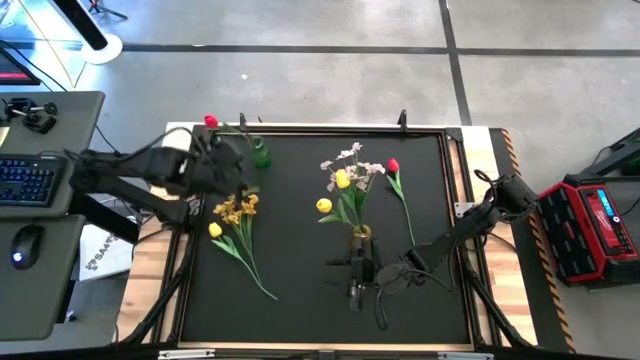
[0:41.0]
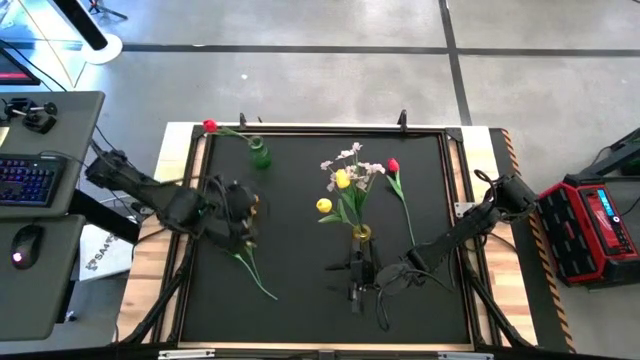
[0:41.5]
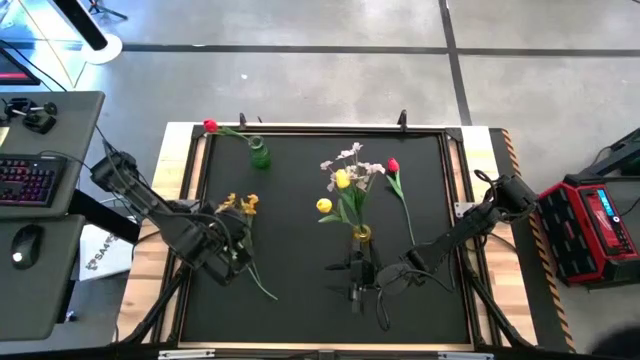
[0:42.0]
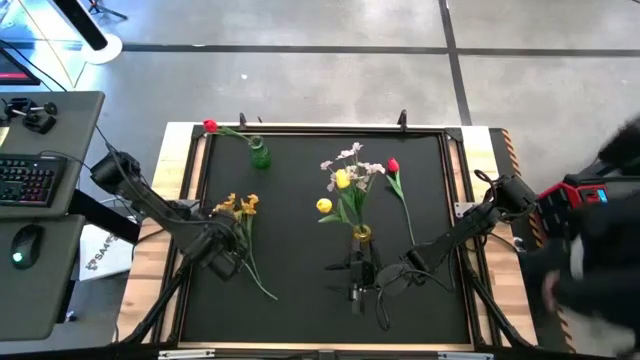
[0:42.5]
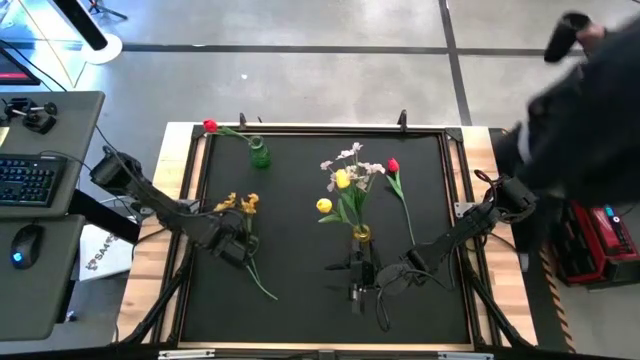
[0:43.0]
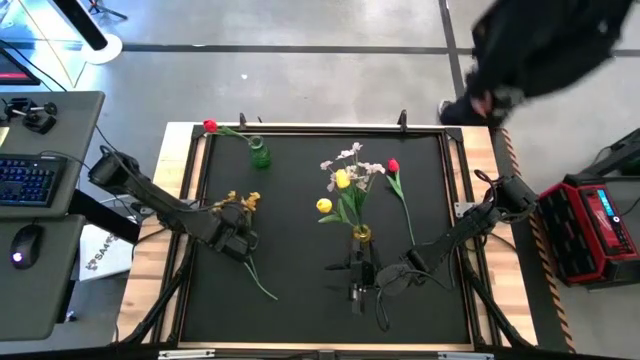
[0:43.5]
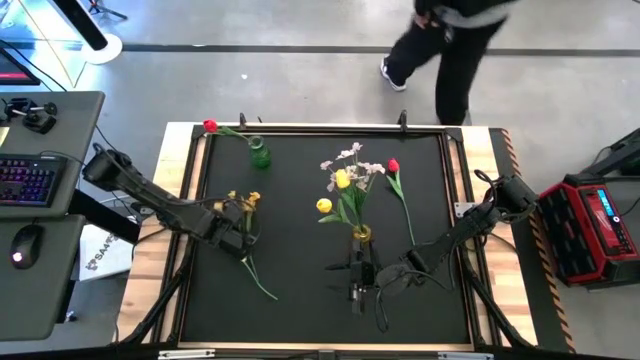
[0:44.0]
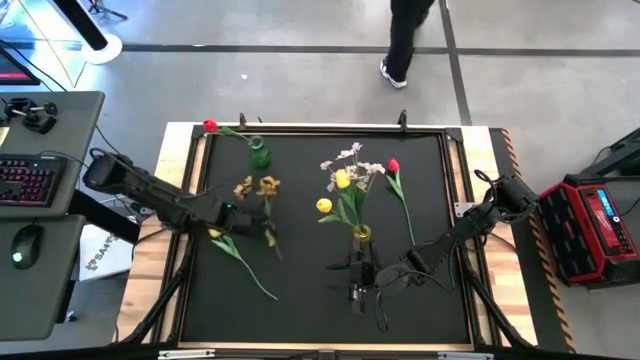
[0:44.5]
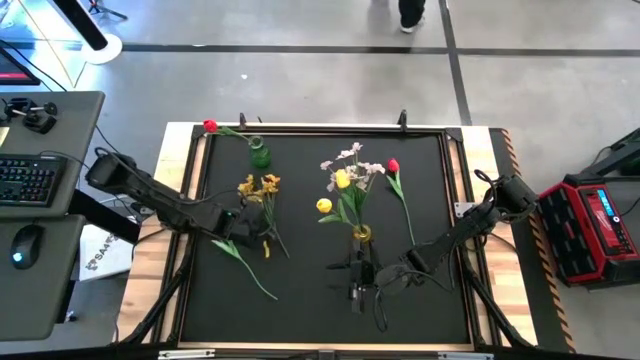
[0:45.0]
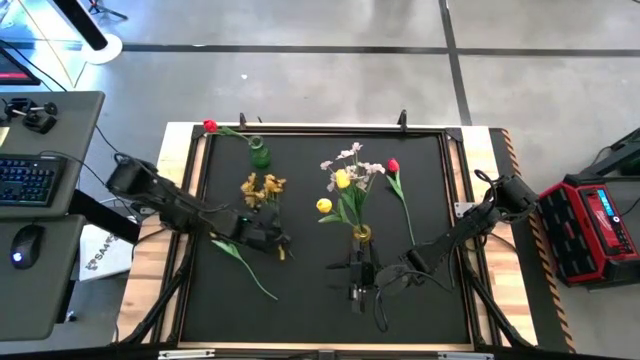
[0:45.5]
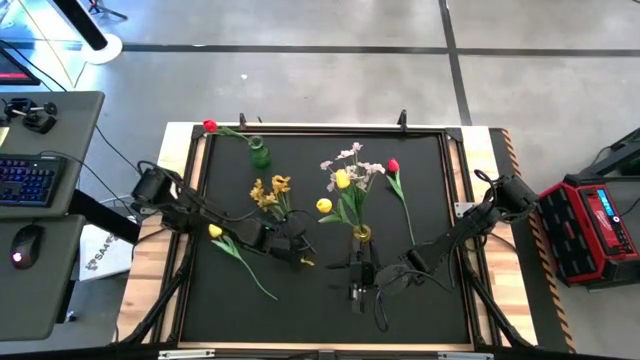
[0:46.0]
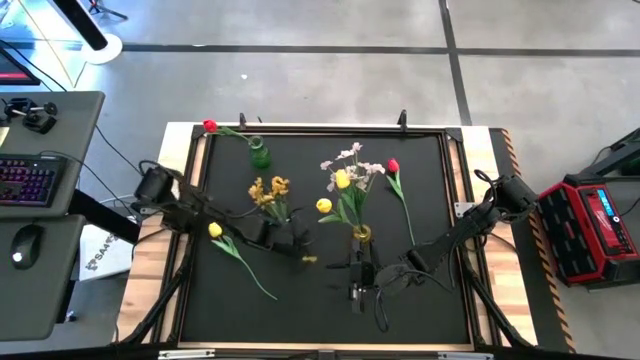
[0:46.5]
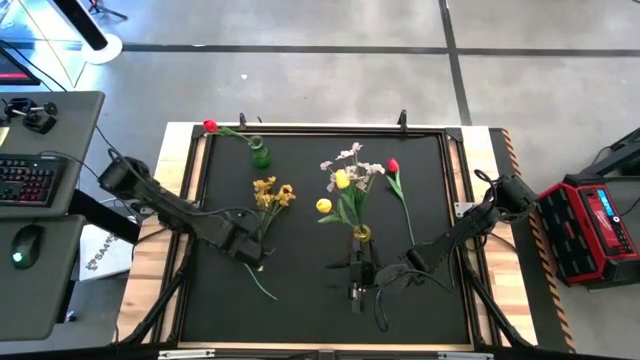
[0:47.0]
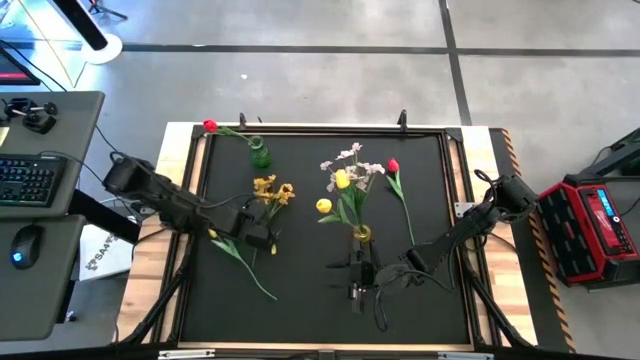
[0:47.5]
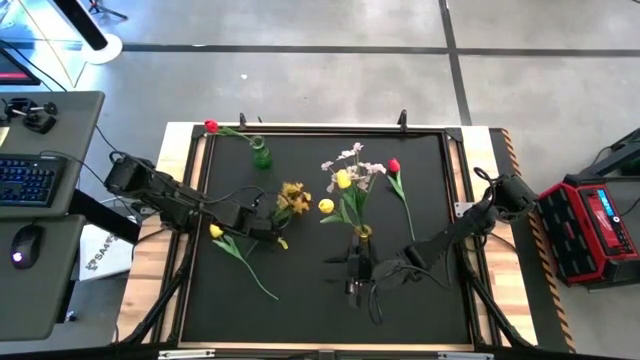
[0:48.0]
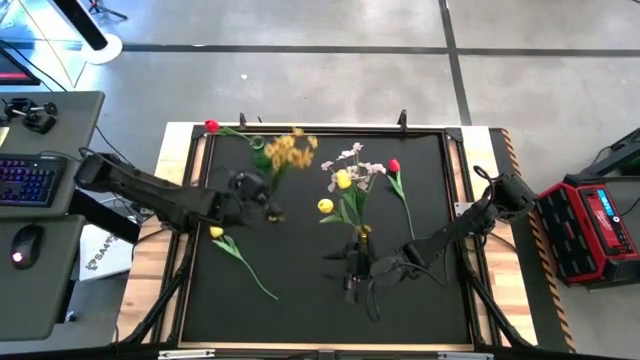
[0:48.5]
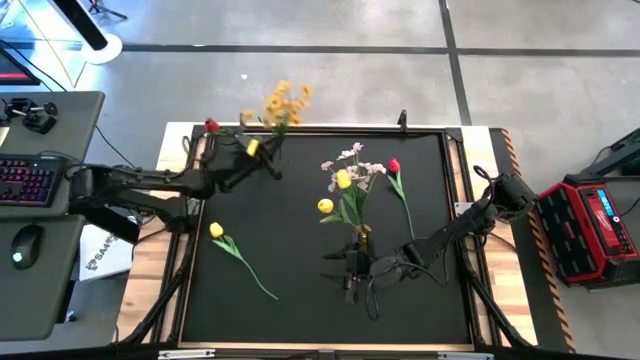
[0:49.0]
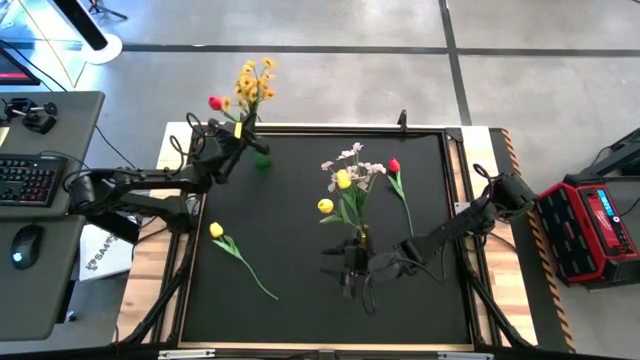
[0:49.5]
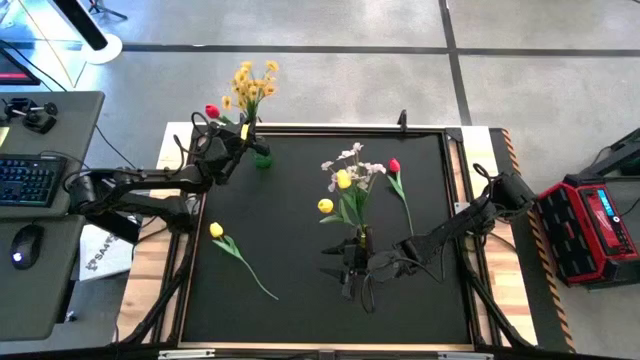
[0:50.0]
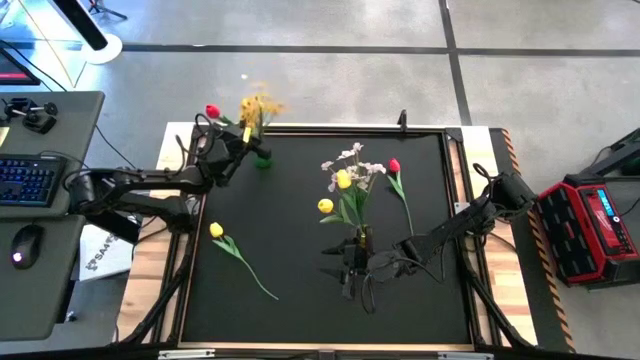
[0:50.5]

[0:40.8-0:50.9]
Task: Sort flowers into vase by color
Put the yellow flowers into the green vase

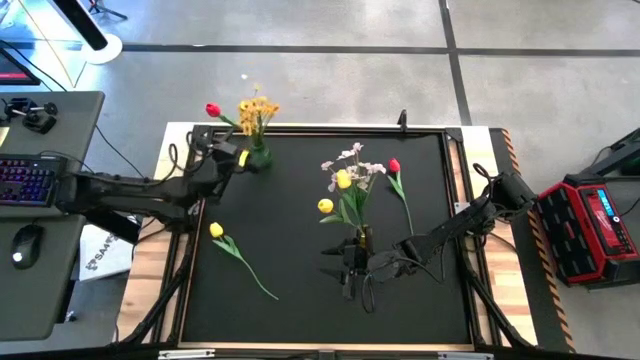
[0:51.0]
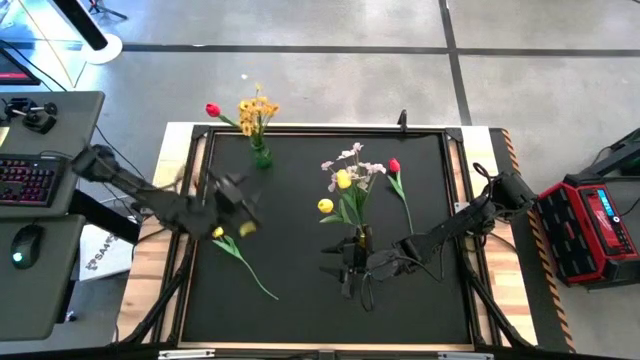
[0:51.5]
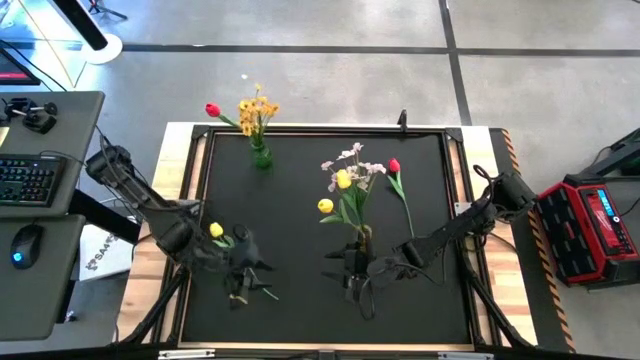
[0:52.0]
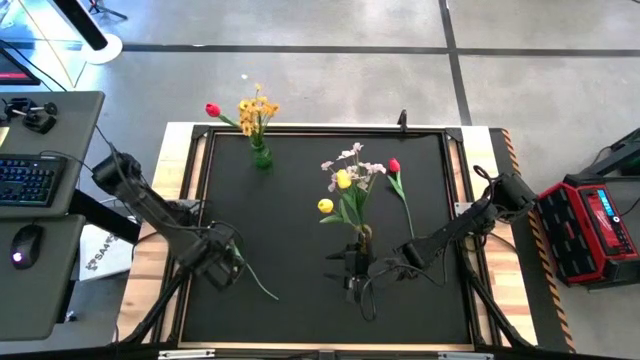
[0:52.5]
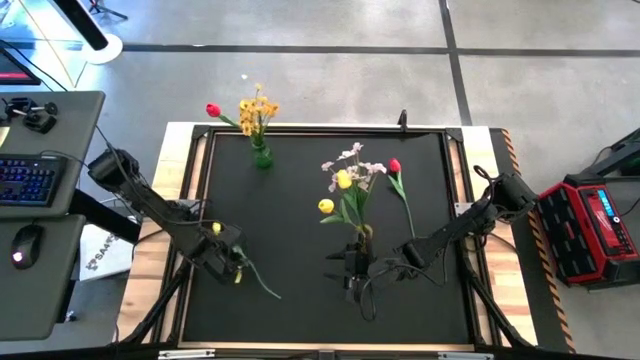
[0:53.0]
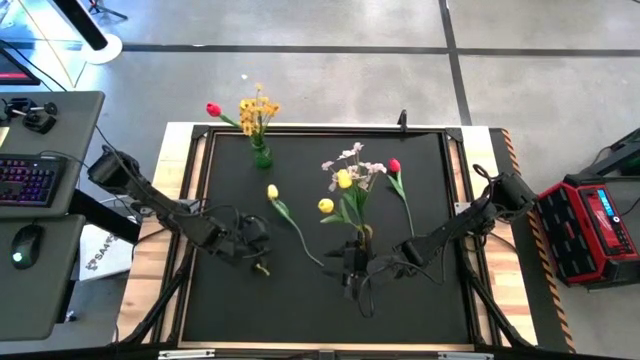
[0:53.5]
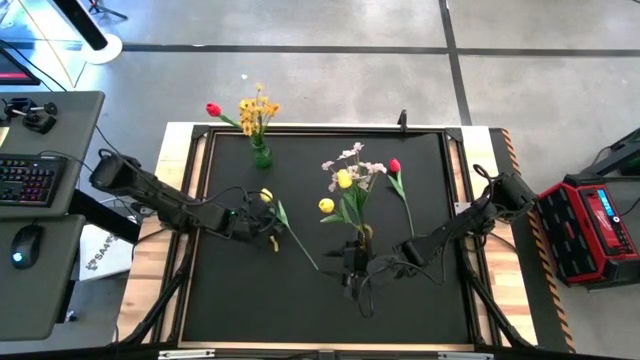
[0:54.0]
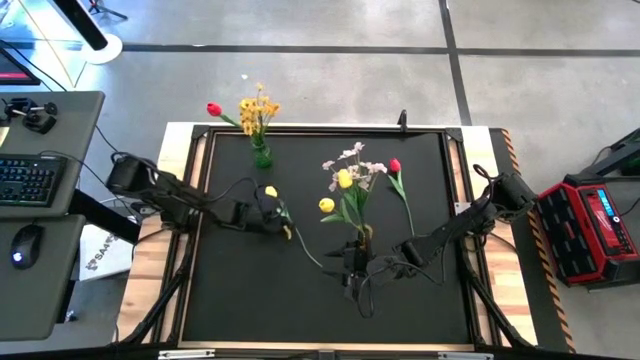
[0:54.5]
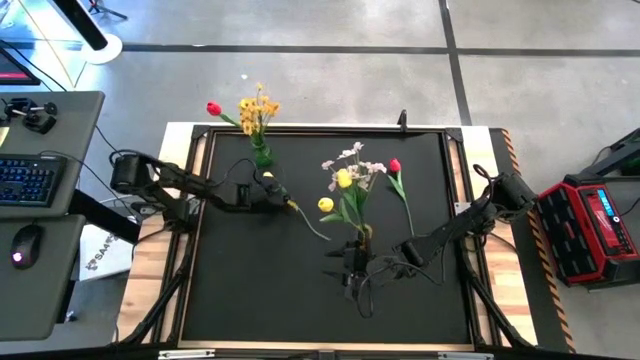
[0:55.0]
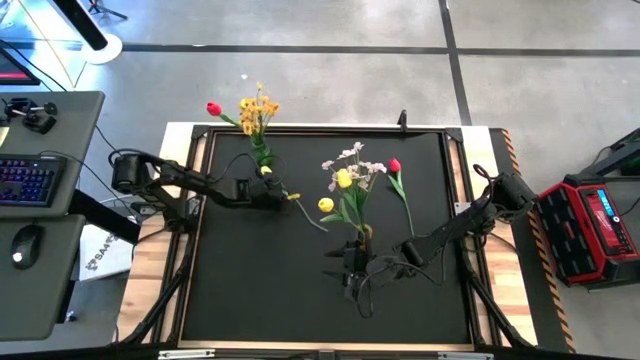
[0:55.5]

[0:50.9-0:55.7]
Put the yellow tulip into the yellow vase

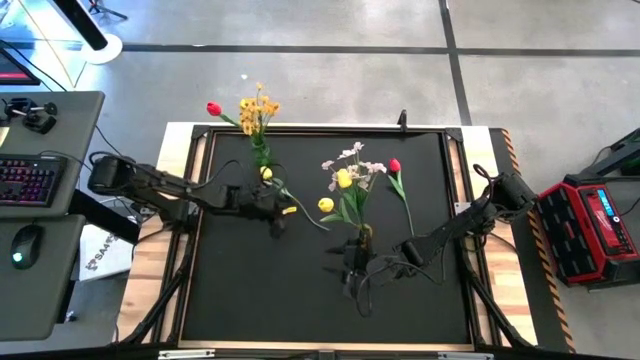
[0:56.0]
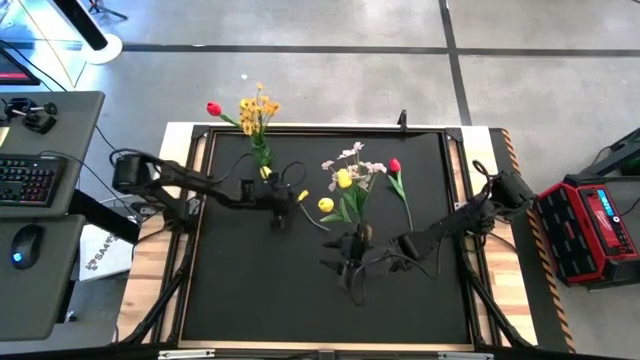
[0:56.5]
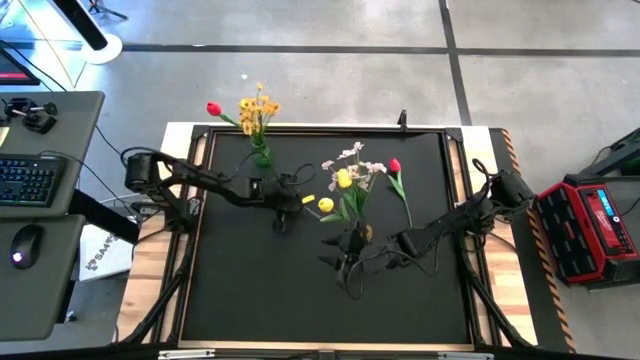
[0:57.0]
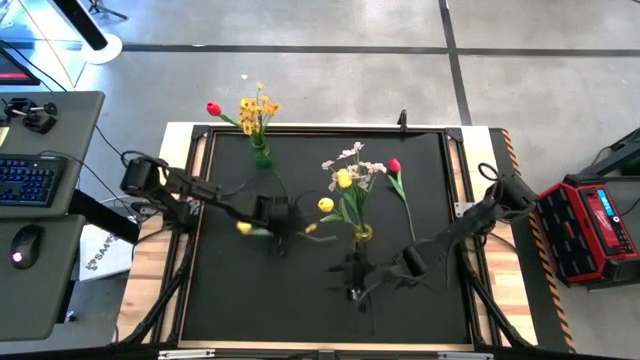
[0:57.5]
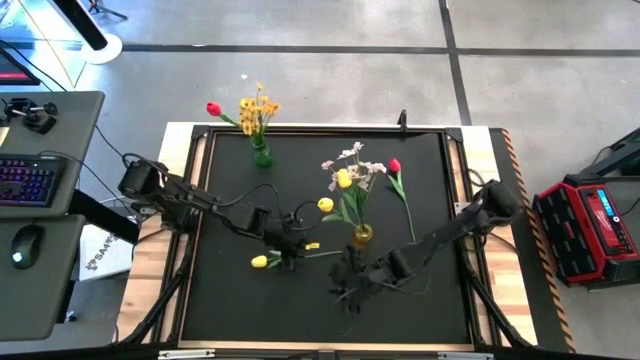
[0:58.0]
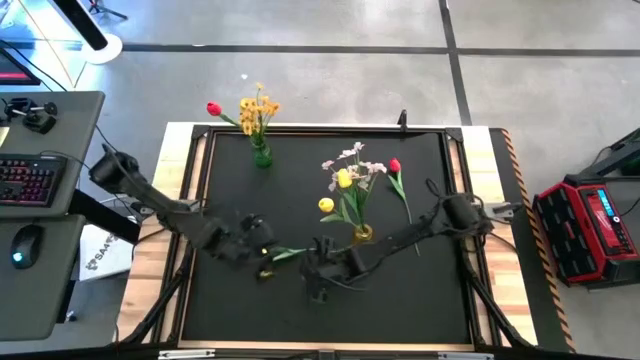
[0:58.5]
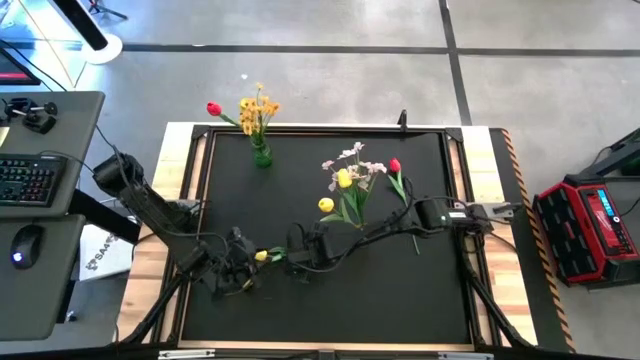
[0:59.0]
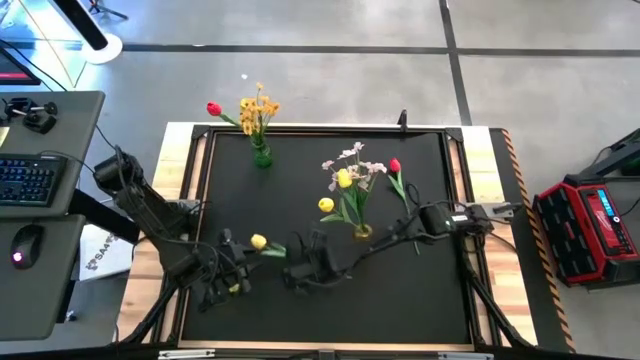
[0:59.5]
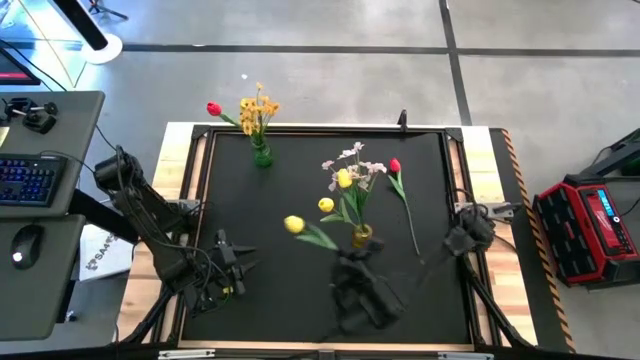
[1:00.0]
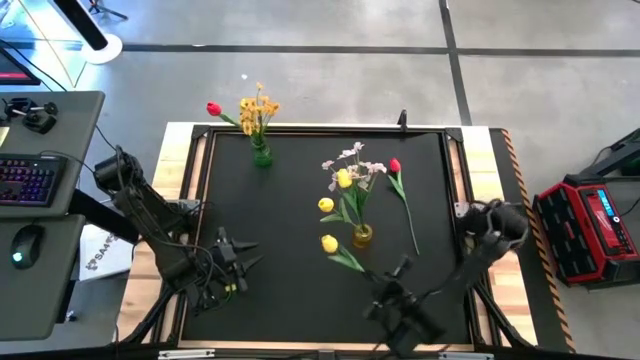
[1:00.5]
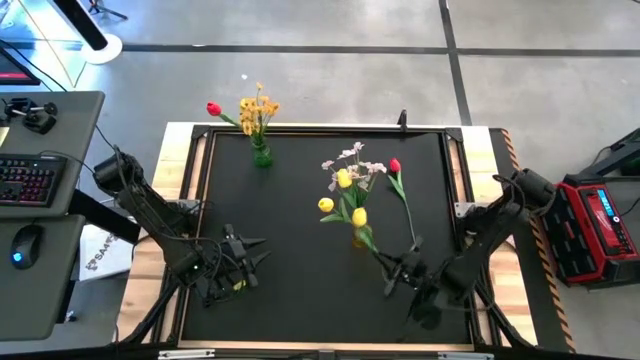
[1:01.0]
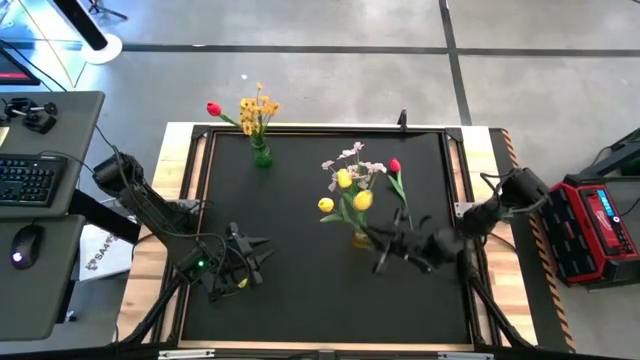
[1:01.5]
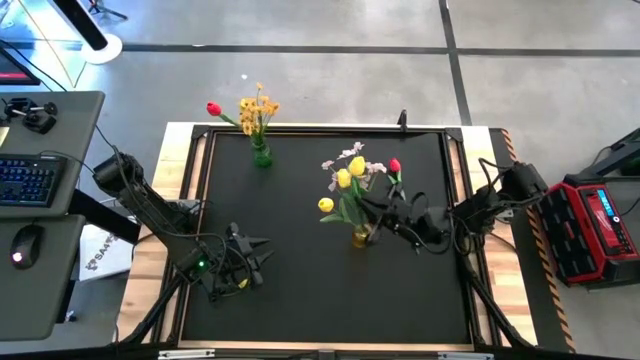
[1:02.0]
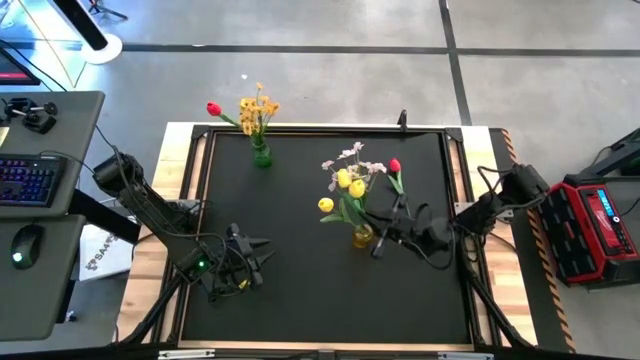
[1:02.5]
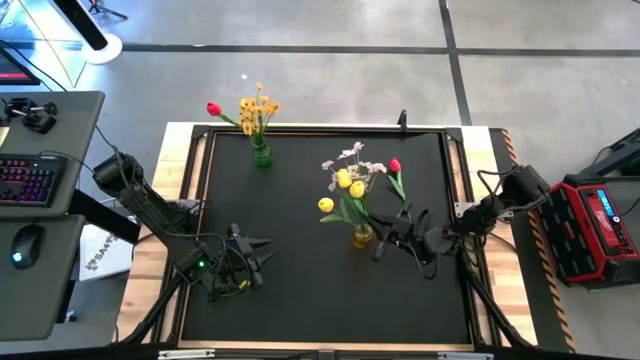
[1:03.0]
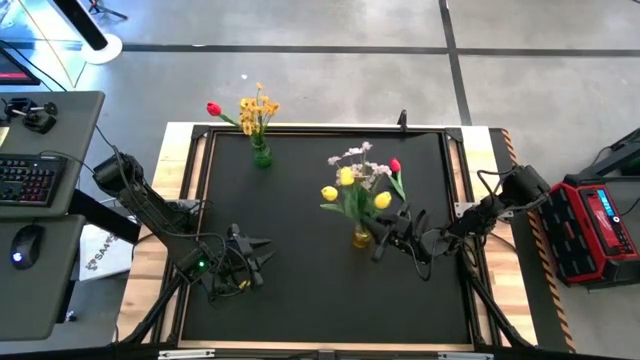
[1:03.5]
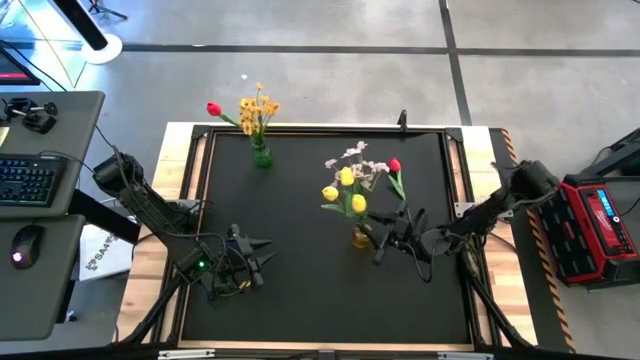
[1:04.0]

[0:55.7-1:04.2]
Put the yellow tulip into the yellow vase
